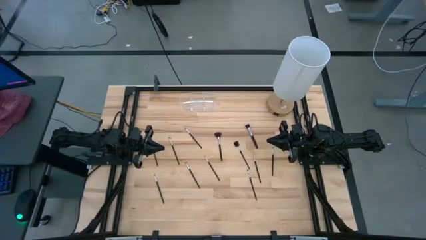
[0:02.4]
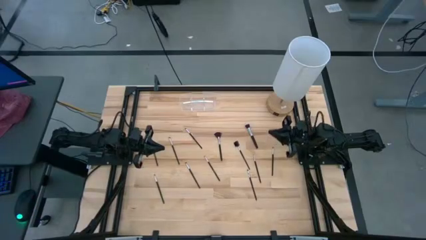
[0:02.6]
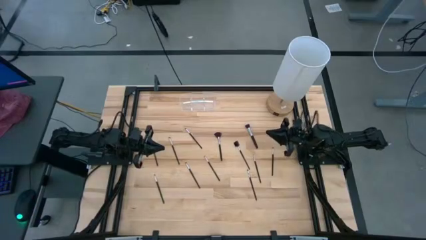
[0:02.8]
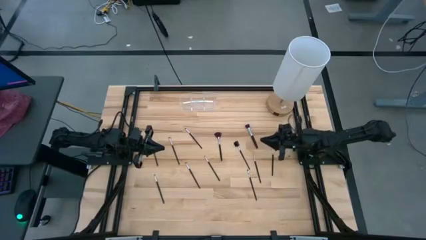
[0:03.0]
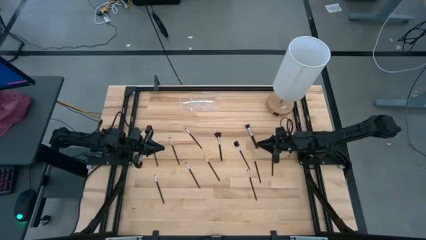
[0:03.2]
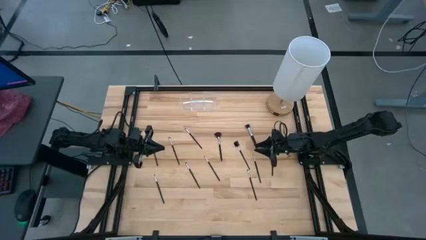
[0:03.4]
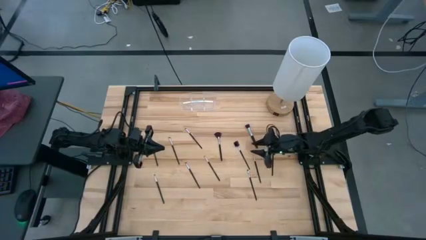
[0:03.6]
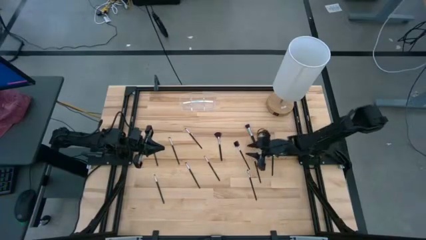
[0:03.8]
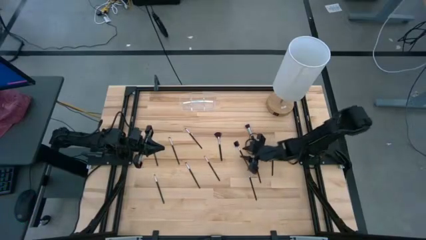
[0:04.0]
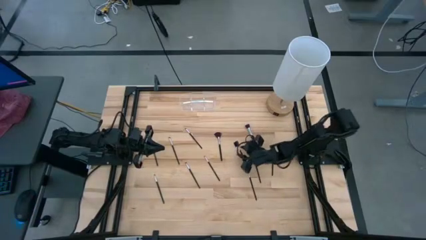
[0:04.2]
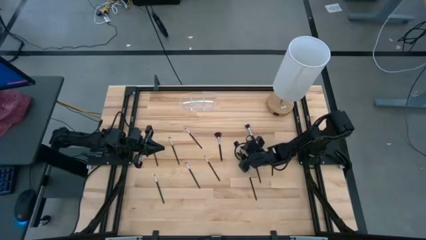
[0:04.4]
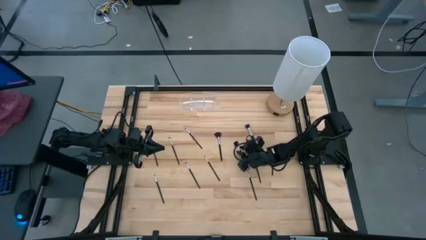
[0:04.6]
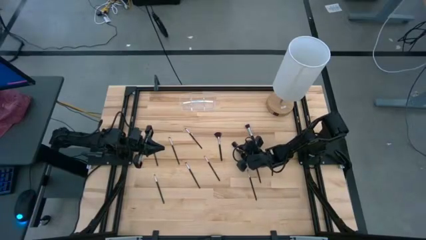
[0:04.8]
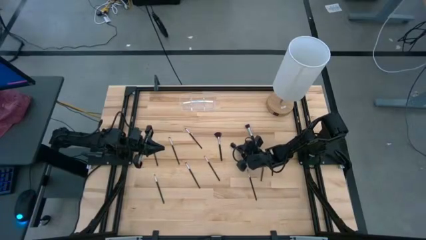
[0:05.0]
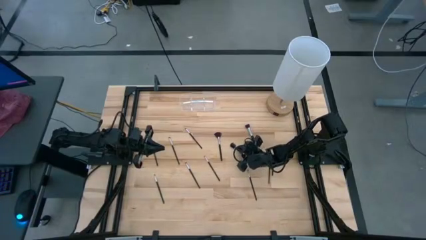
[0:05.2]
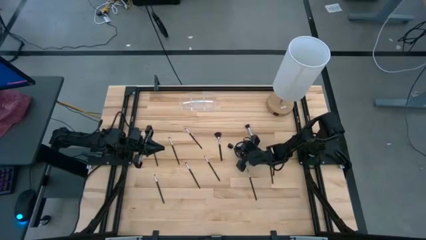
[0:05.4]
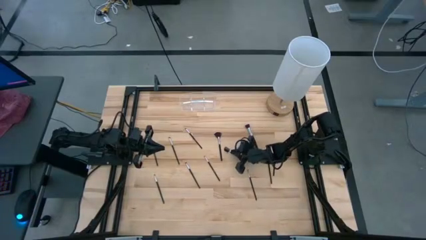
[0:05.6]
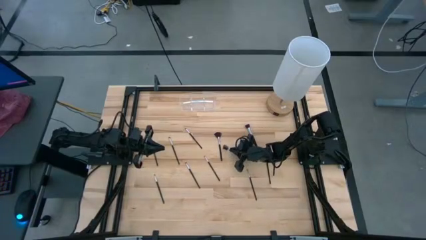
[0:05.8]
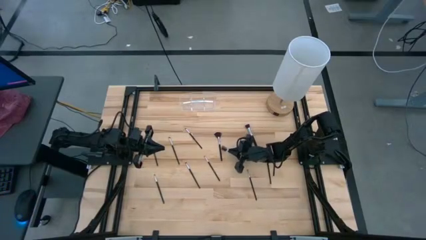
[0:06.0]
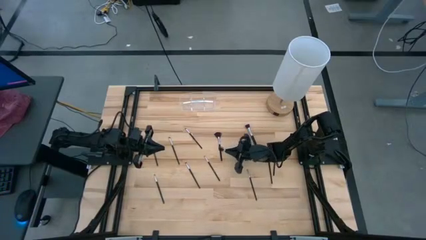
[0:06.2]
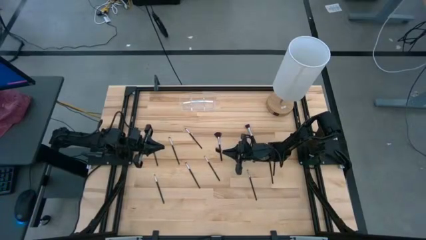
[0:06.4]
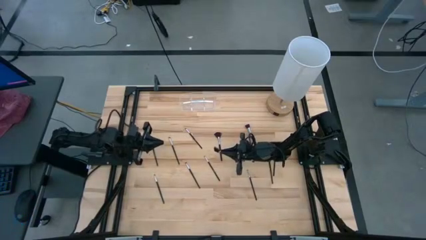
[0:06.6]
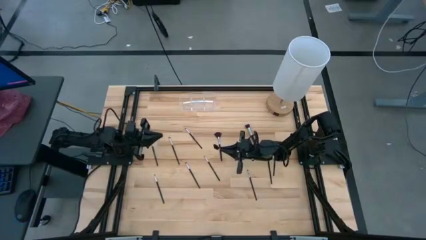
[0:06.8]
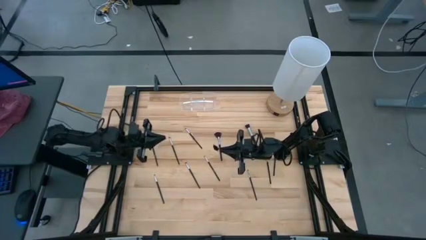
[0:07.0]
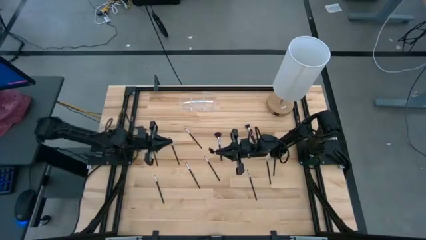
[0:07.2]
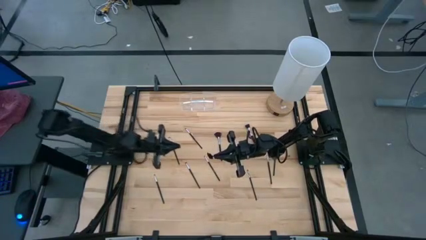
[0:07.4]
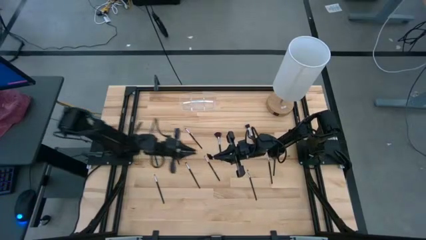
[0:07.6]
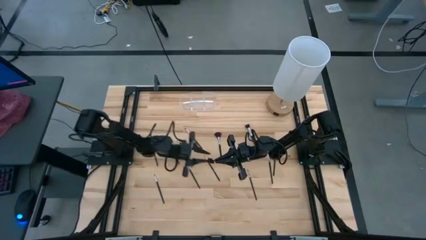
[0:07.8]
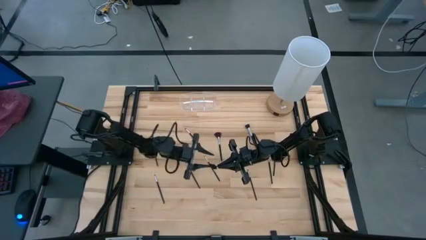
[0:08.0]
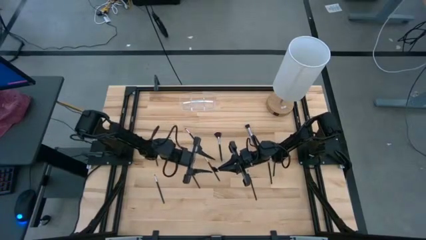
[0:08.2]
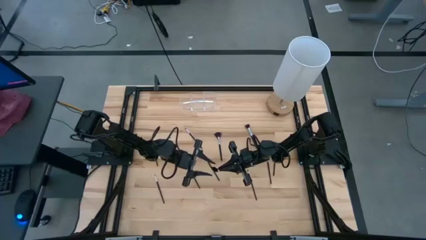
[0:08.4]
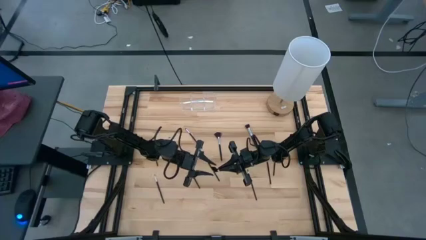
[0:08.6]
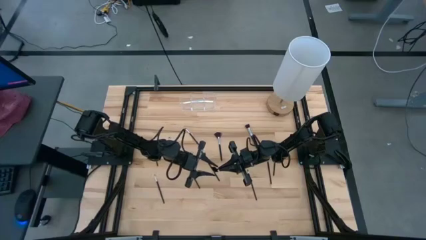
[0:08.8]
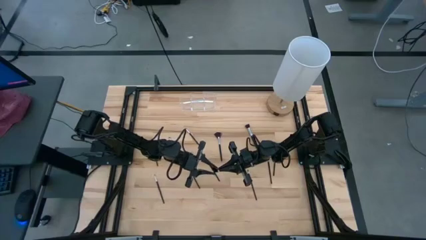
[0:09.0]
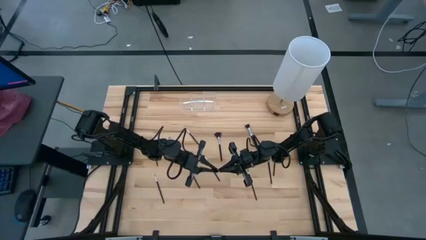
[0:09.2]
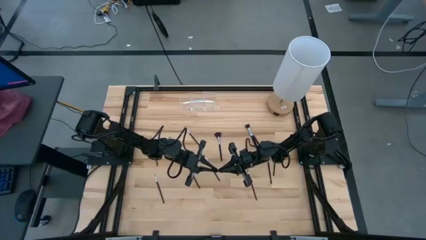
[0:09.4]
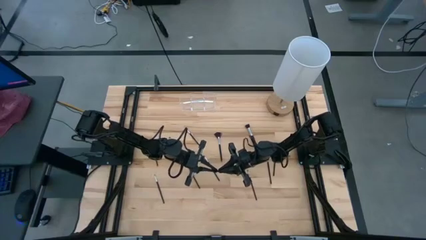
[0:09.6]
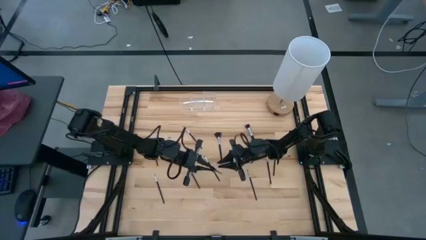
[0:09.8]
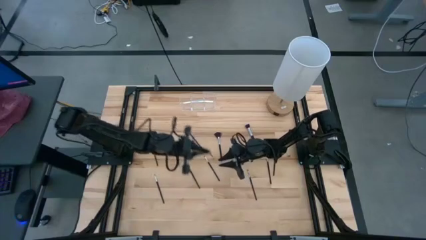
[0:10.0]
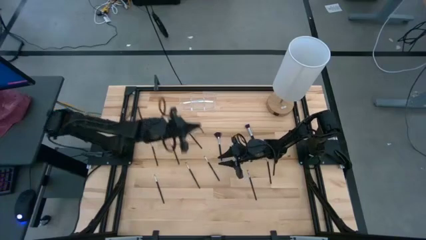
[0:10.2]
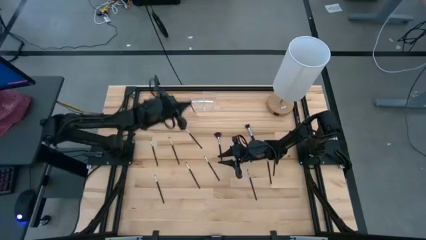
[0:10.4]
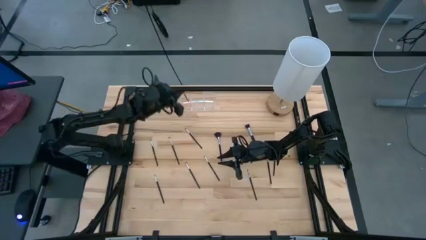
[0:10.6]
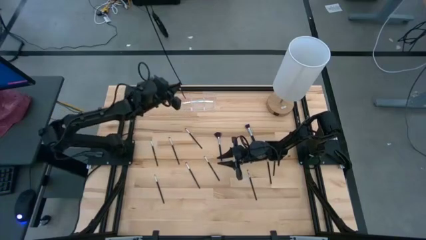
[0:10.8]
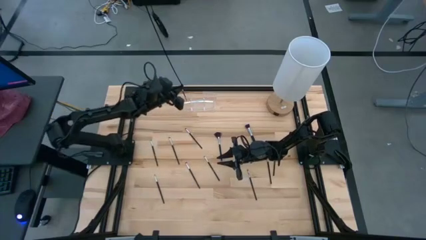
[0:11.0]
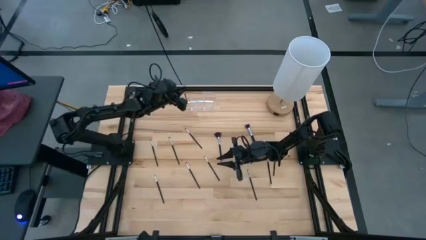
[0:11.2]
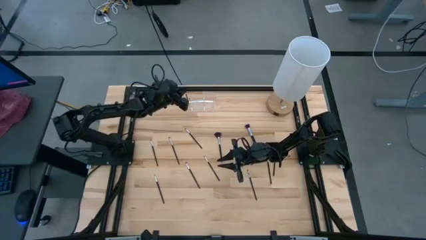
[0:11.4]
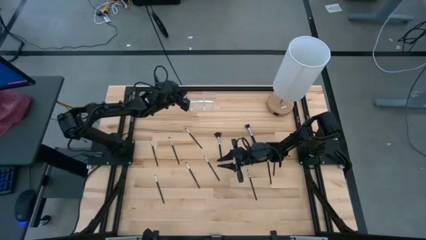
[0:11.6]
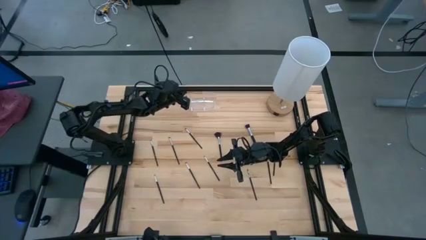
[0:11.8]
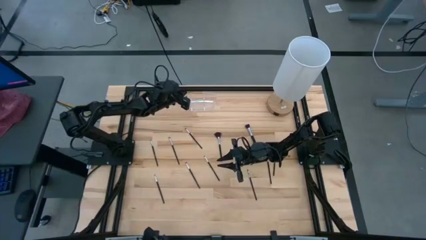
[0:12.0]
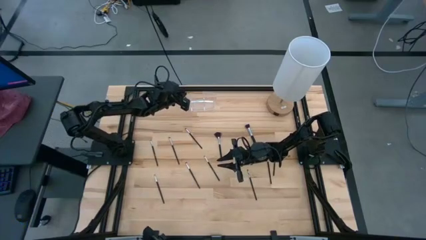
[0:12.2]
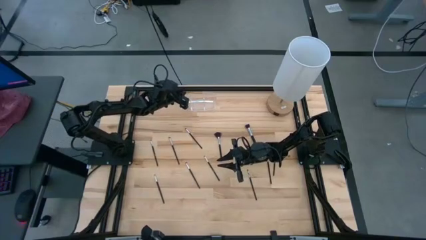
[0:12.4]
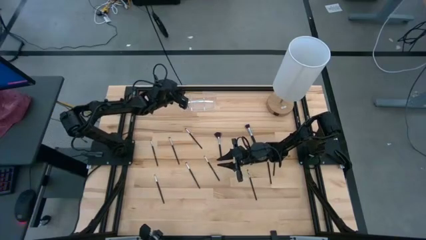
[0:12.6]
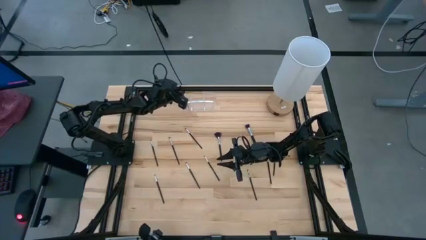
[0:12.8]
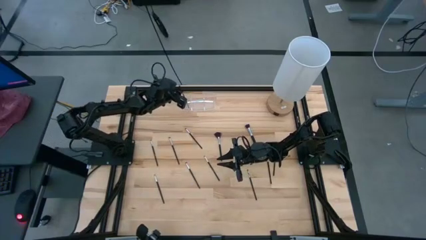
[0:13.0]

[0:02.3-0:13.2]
Task: Put items in baskets/containers
Put the black brow brush into the transparent organizer

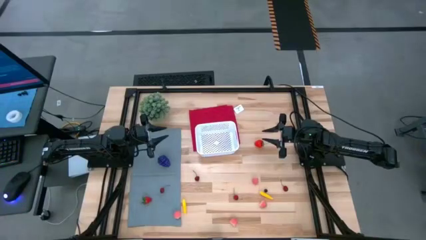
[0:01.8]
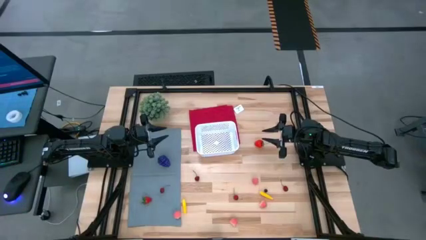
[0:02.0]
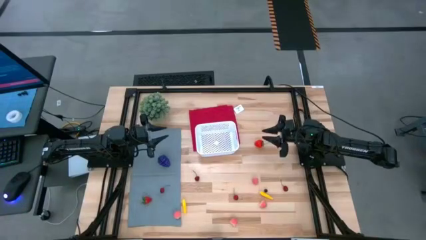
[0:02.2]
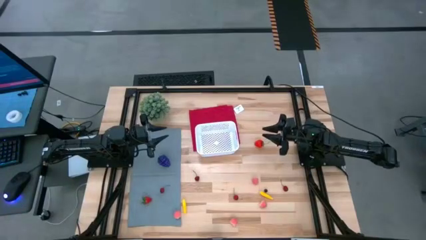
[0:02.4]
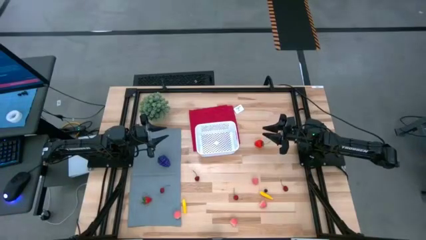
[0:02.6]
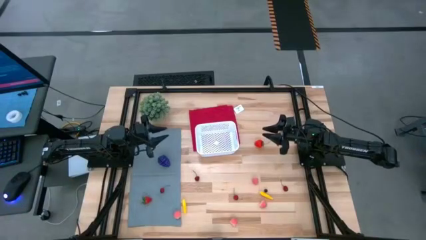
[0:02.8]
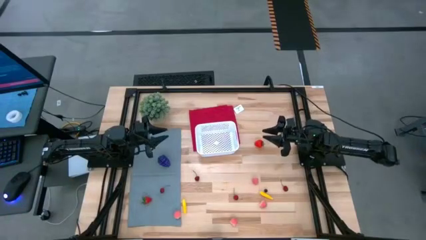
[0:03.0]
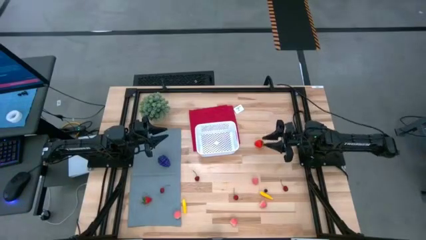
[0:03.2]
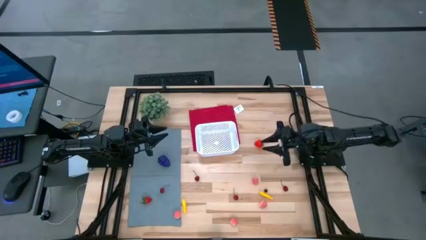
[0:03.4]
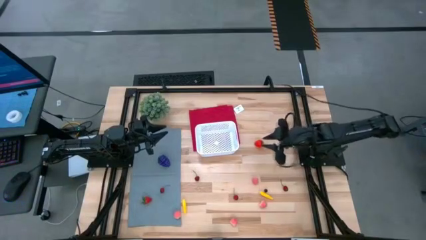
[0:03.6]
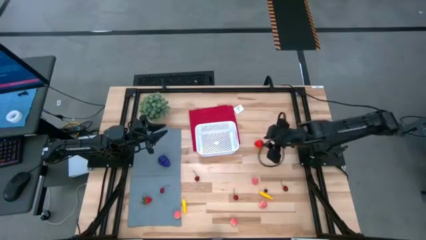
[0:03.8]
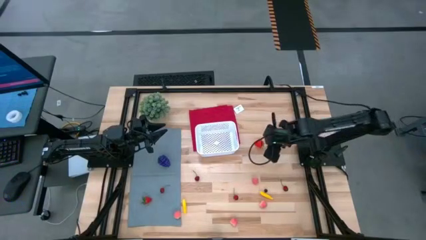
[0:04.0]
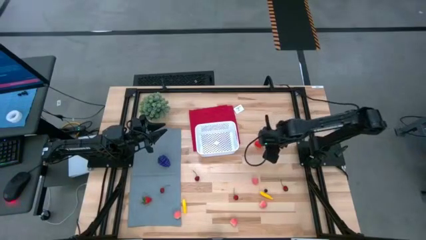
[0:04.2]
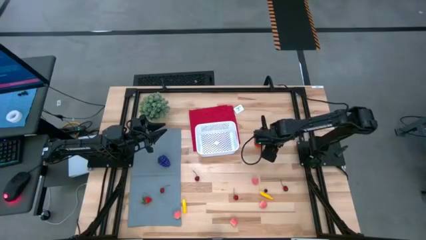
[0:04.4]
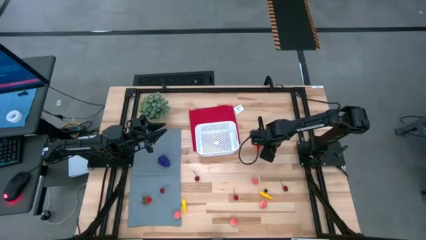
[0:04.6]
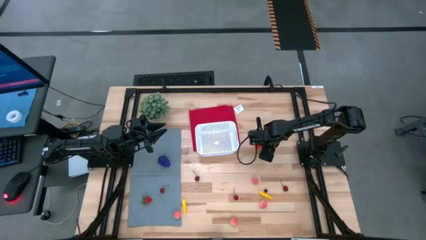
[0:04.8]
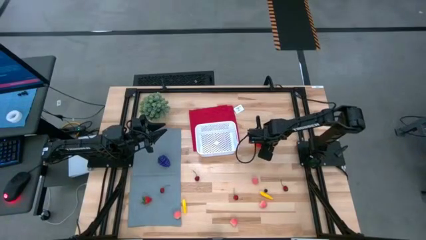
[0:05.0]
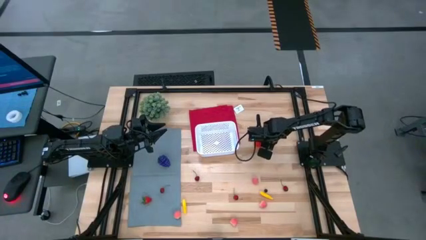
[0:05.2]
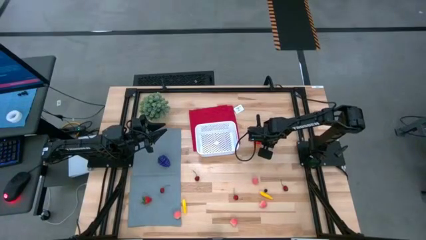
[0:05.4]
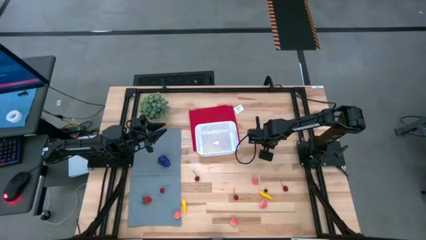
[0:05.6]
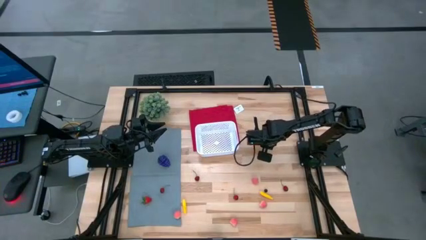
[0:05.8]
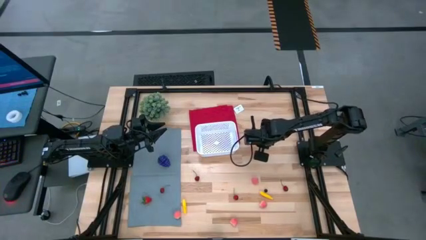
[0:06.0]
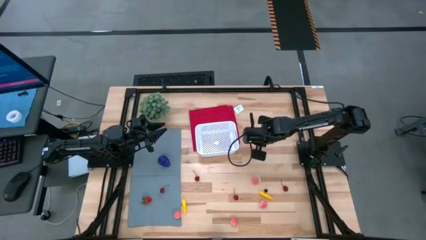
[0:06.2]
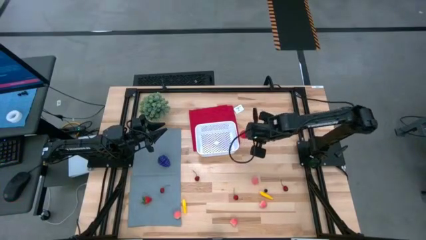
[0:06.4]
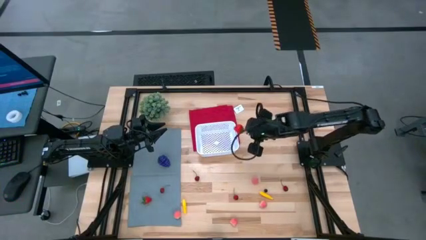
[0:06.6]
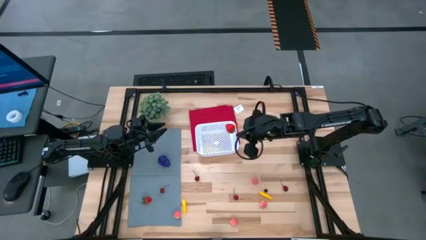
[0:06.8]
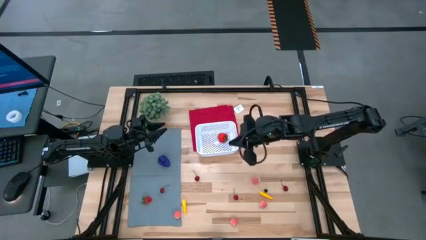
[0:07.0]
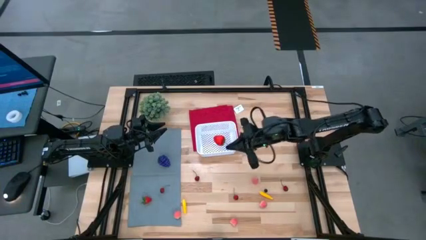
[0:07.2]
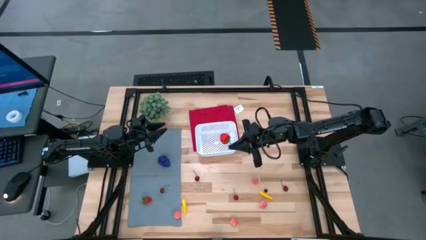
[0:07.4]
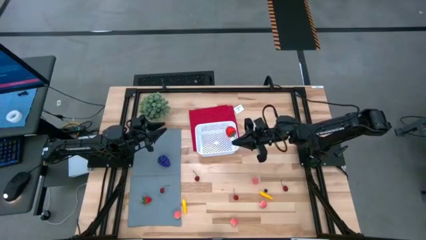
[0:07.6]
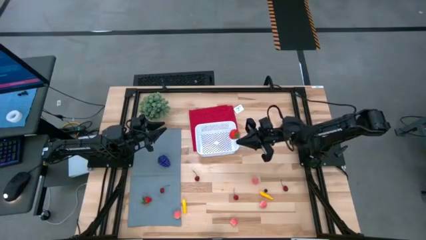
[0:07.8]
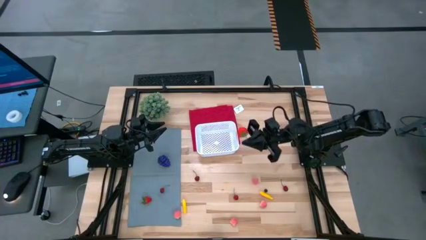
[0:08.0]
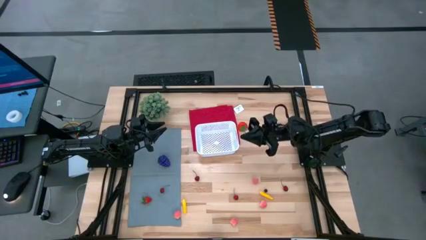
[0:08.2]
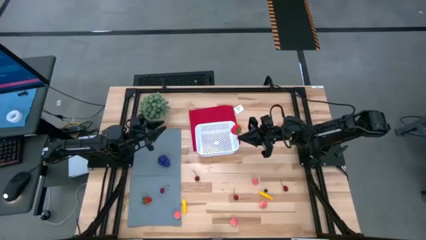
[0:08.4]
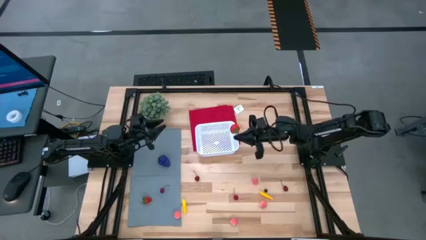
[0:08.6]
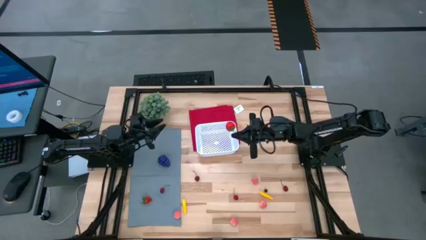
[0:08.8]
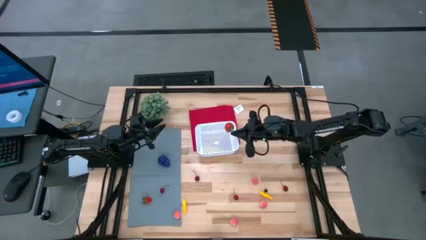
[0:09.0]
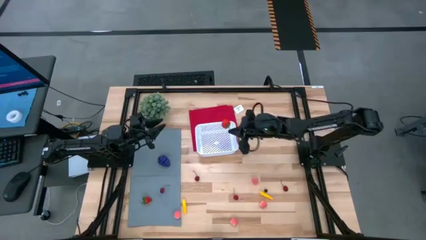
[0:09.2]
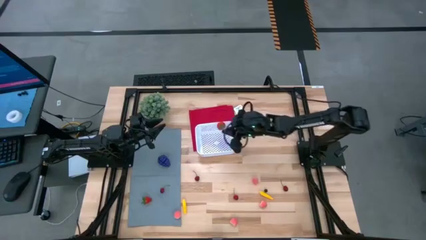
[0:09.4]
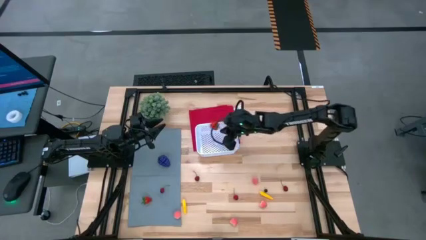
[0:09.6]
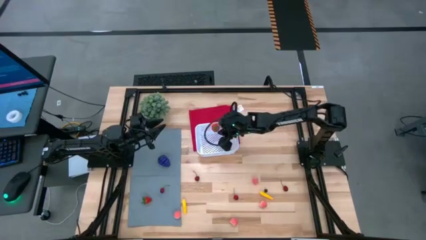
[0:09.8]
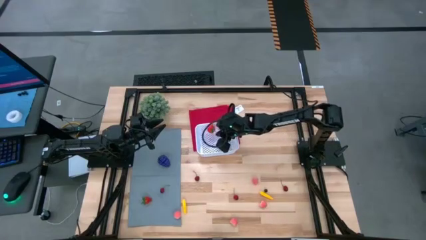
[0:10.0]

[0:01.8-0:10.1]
Task: Pick and placing Produce into tupperware
Put the red strawberry into the white bin
